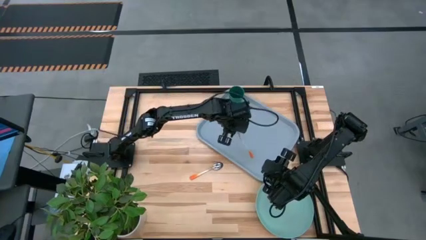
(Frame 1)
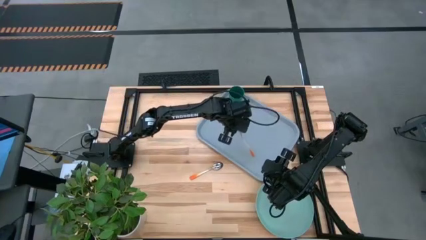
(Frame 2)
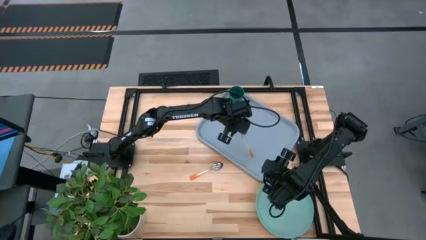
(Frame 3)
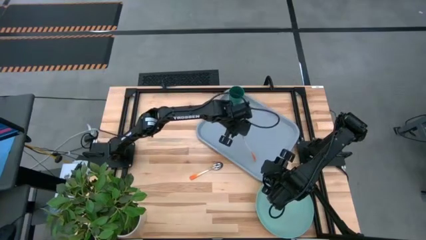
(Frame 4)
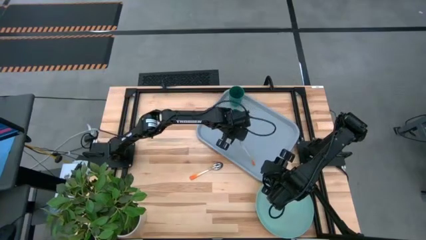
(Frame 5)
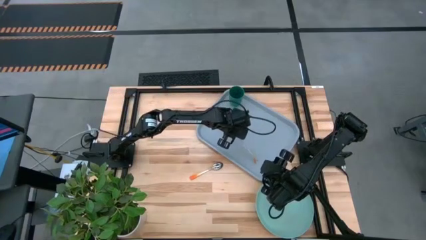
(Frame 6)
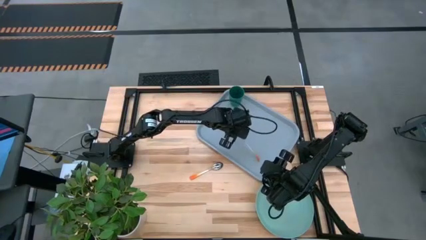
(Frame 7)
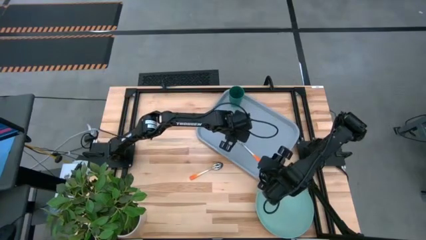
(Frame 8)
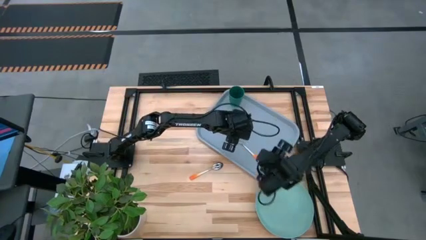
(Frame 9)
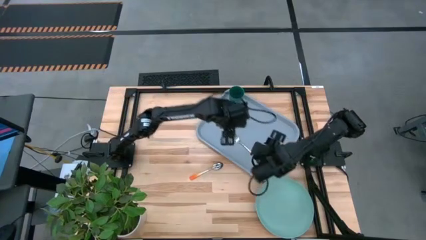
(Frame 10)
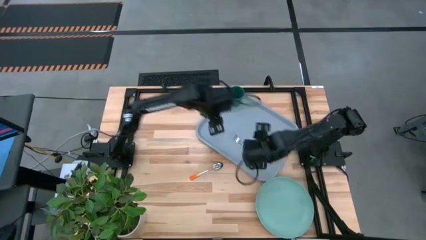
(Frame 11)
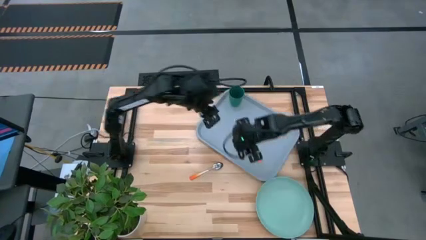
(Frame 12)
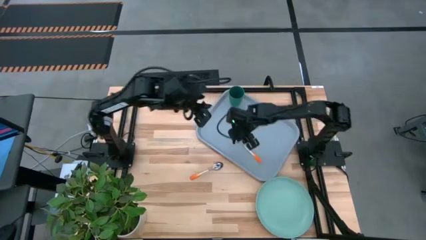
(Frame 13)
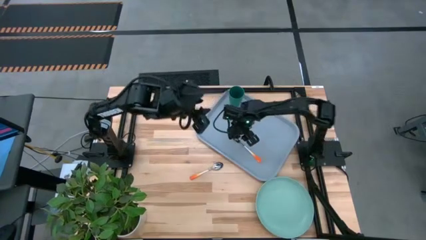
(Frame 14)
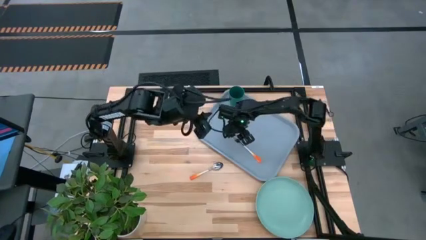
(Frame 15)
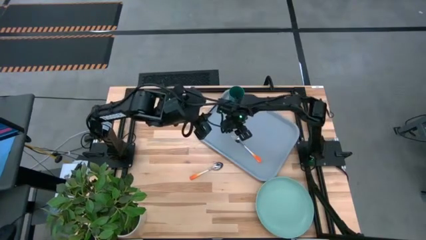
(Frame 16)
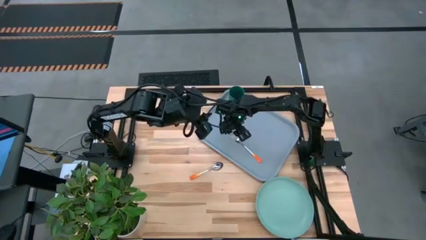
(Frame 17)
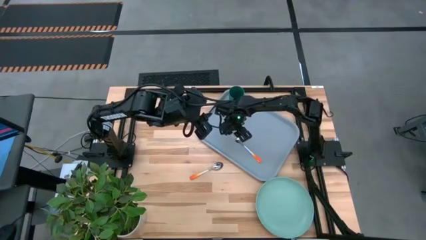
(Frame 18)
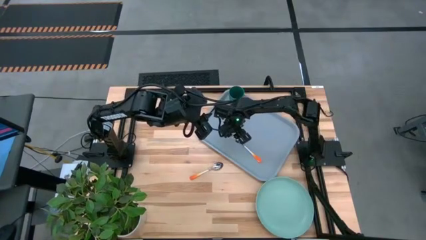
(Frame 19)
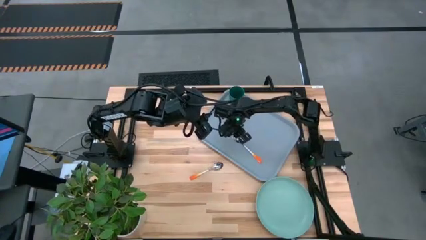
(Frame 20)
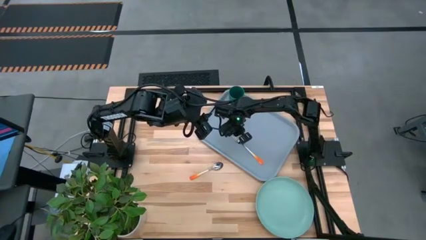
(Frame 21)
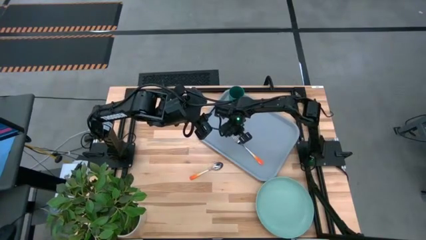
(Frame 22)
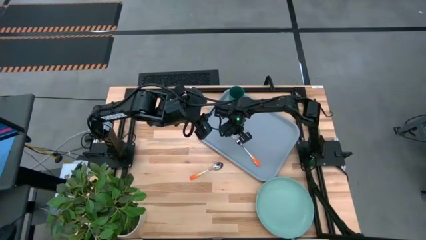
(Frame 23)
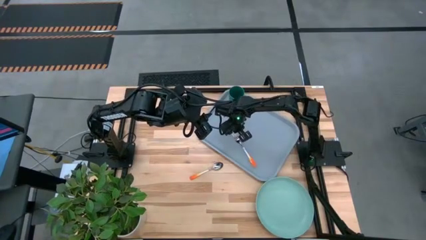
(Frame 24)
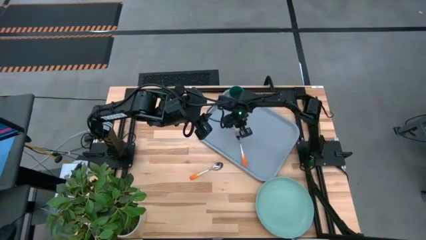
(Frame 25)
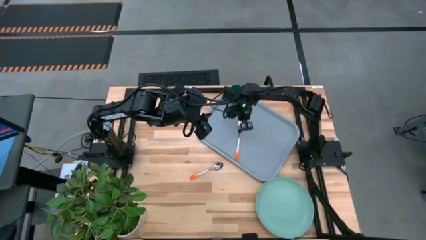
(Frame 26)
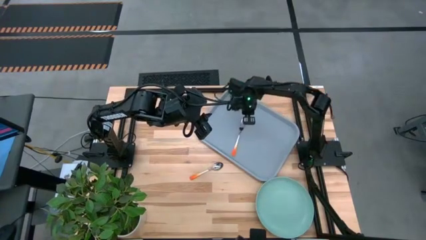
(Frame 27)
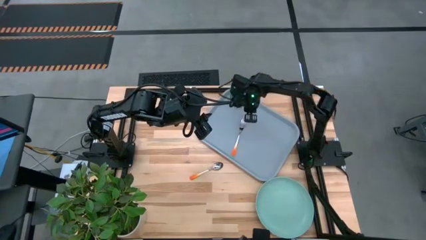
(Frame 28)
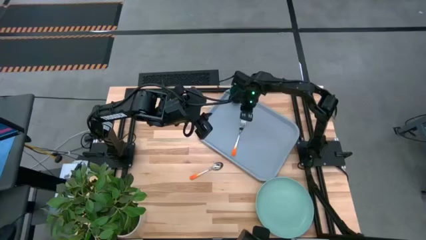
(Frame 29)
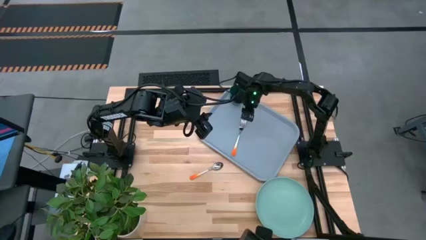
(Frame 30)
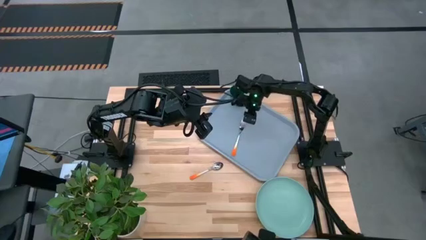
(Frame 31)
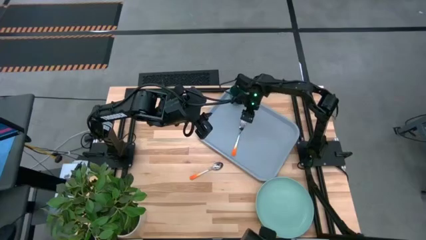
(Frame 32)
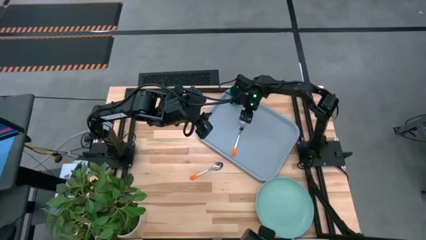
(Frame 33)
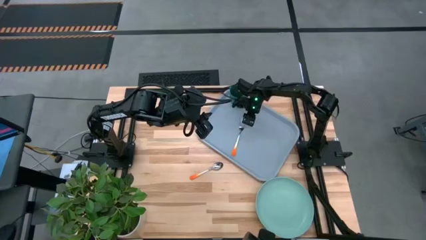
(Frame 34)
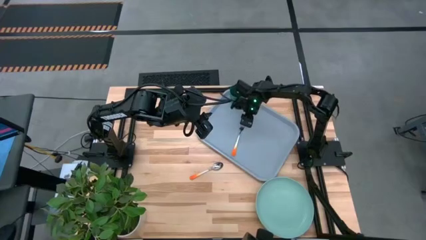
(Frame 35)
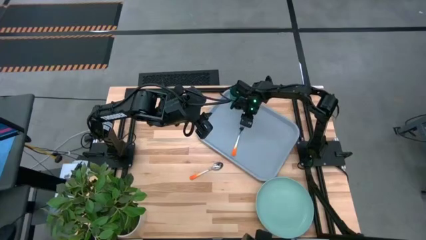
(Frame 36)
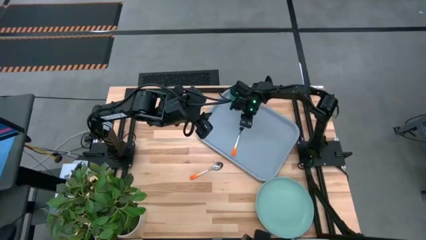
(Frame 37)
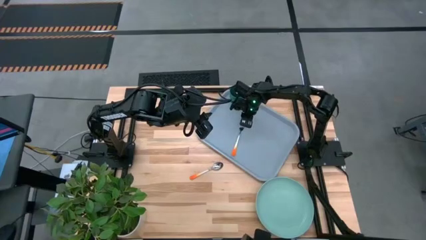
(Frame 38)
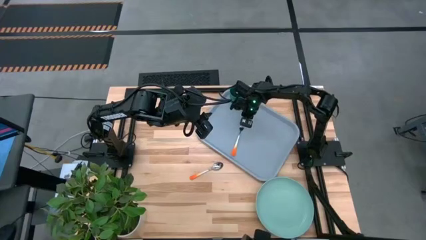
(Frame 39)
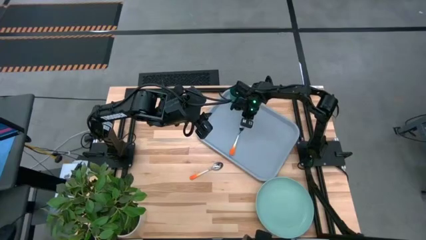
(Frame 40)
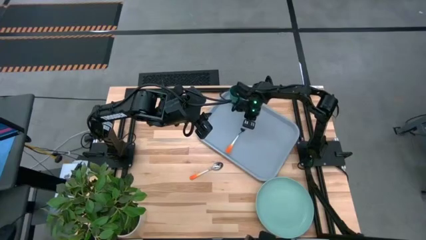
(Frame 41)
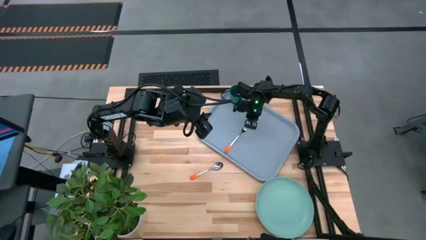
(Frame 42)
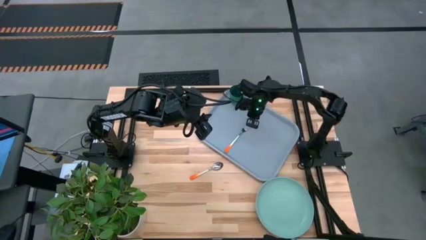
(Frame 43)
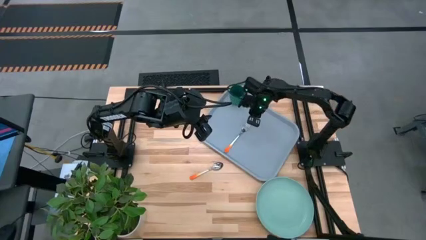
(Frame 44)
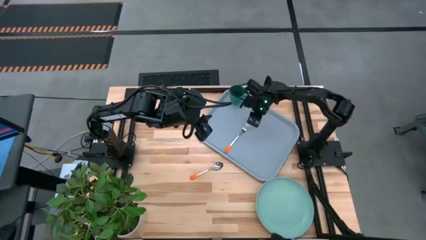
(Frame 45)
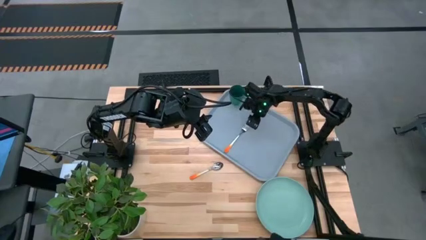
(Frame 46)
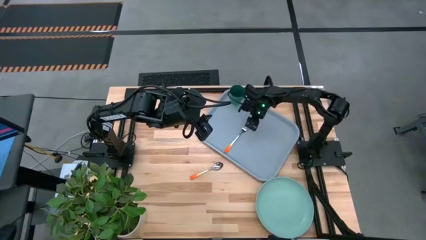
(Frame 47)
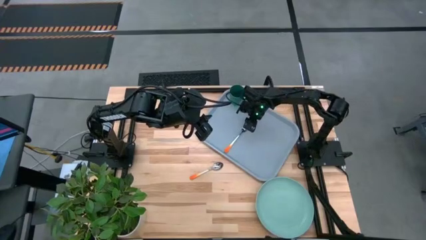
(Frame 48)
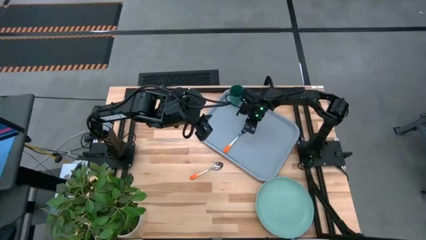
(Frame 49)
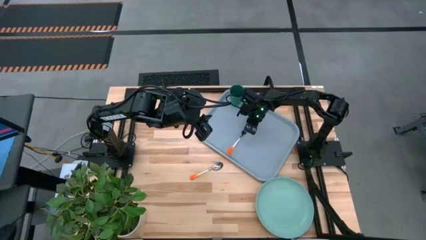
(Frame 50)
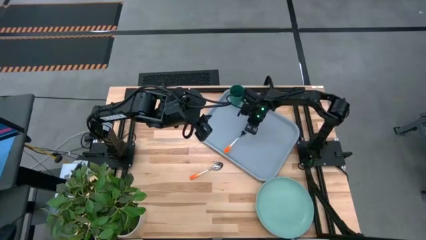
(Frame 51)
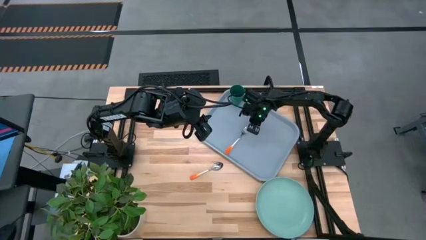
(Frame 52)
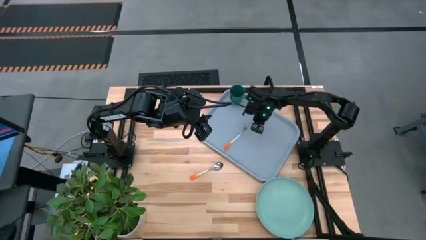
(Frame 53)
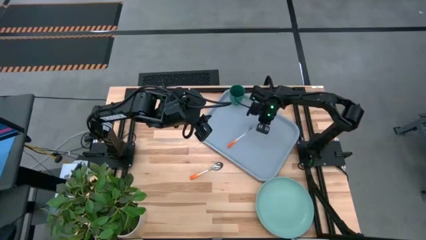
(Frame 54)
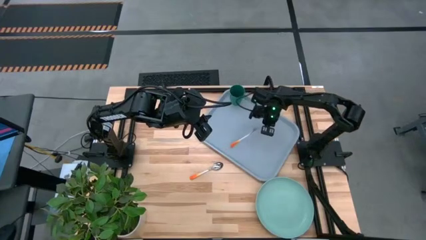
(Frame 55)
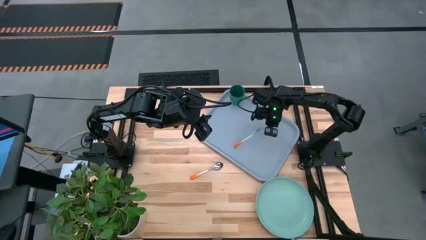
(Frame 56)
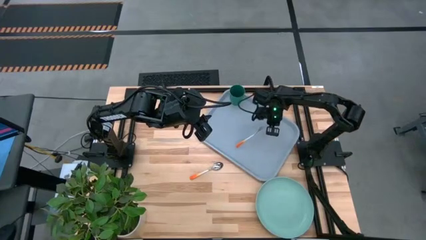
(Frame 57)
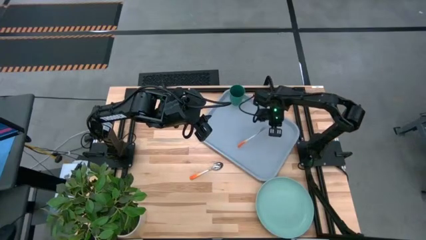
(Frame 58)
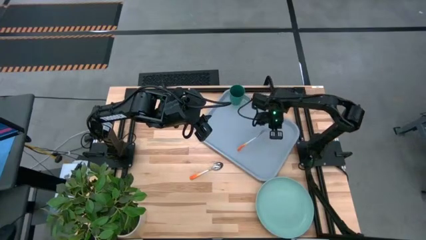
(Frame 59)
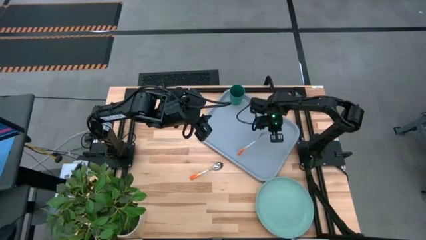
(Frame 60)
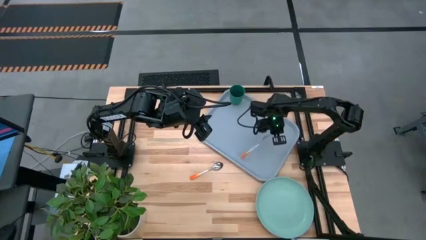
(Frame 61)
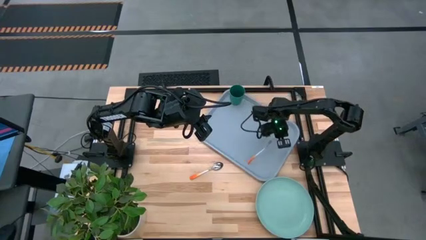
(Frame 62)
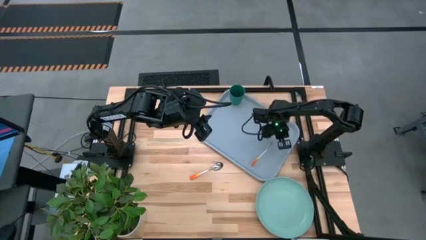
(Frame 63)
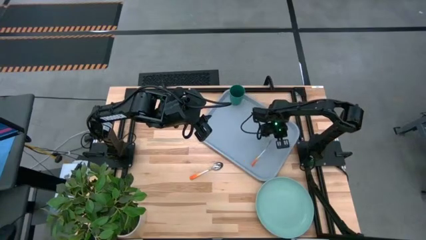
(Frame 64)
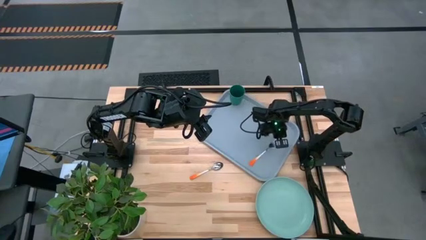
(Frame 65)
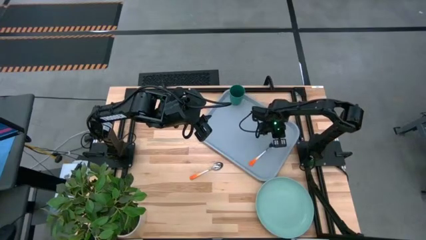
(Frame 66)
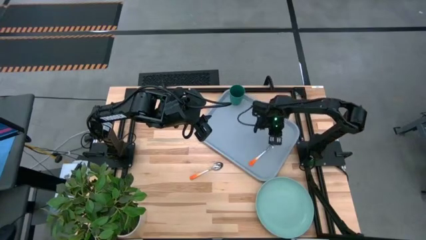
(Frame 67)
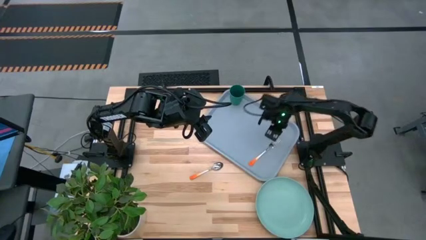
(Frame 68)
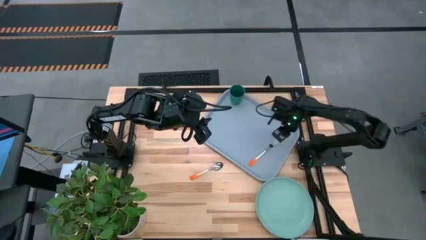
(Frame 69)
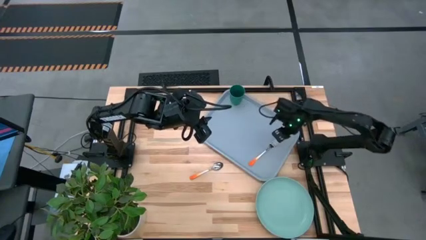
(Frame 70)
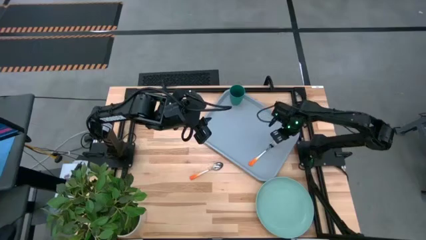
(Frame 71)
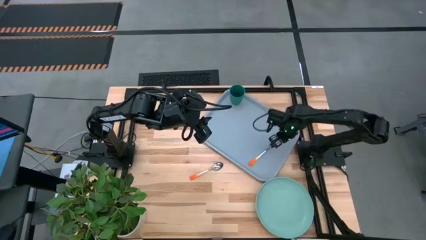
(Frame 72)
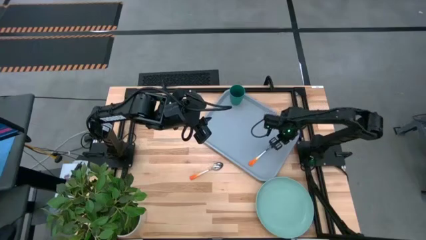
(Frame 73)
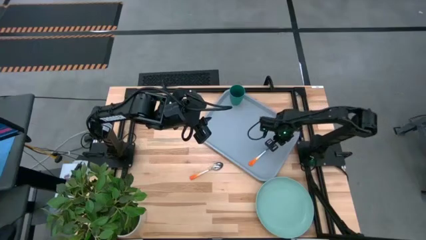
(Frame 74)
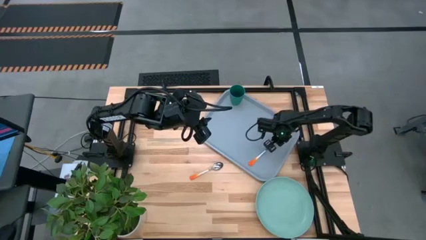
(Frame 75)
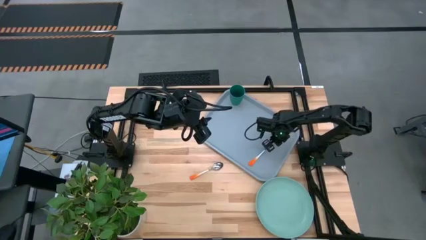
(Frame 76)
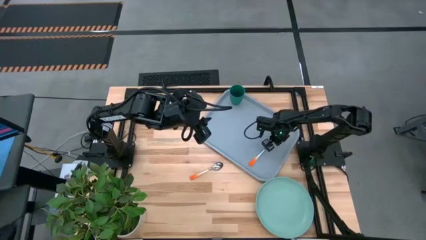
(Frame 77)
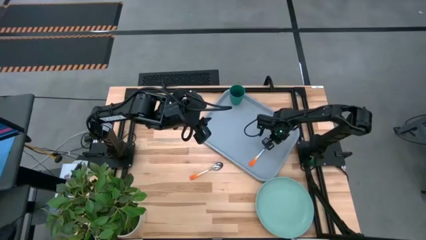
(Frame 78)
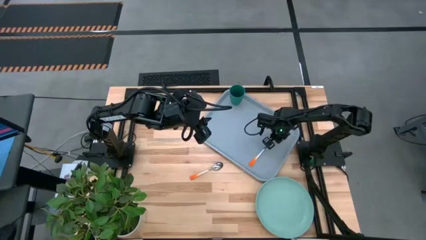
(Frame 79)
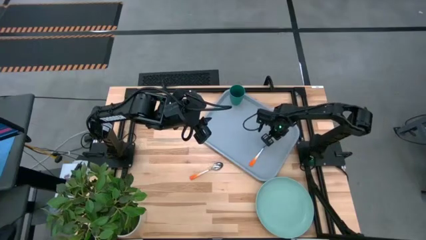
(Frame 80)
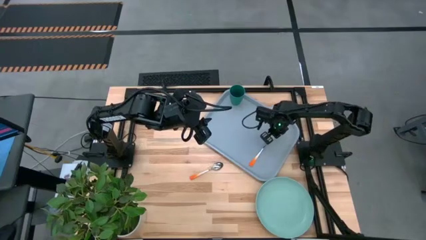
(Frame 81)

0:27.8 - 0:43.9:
Task: Pick and place plate/cup/fork/spoon on tray
Put the orange fork to the right of the blue tray
